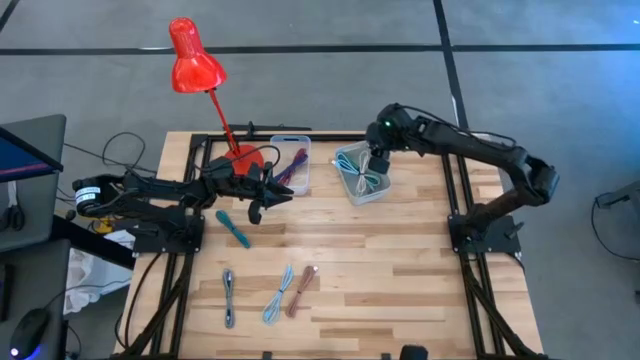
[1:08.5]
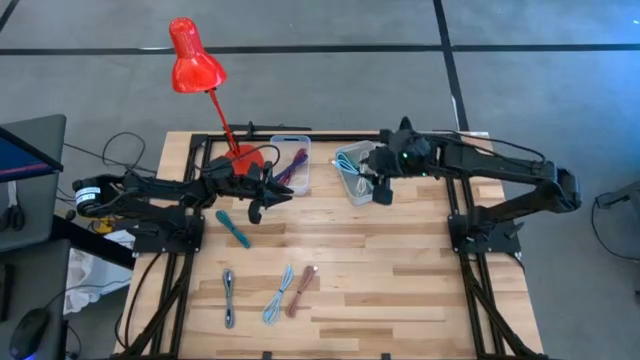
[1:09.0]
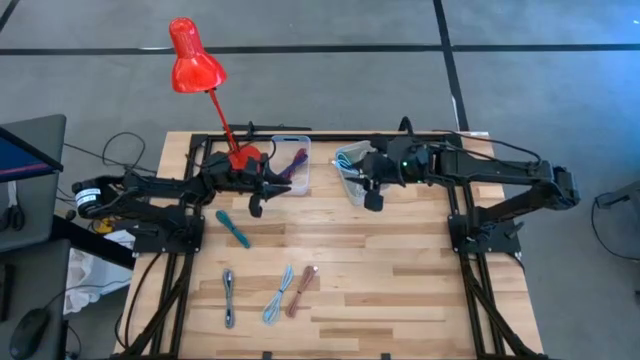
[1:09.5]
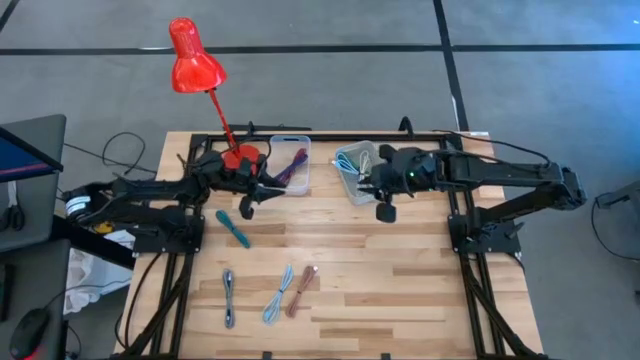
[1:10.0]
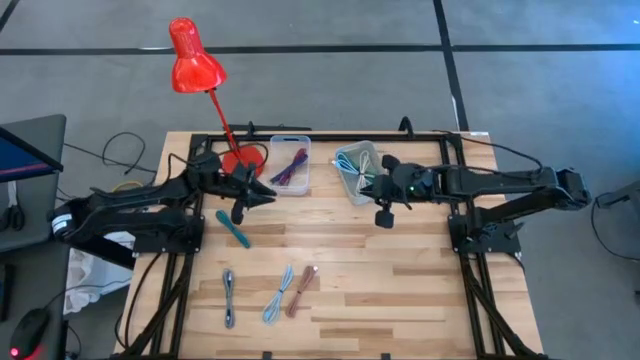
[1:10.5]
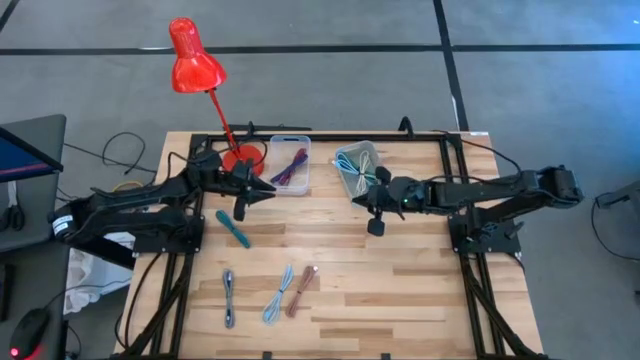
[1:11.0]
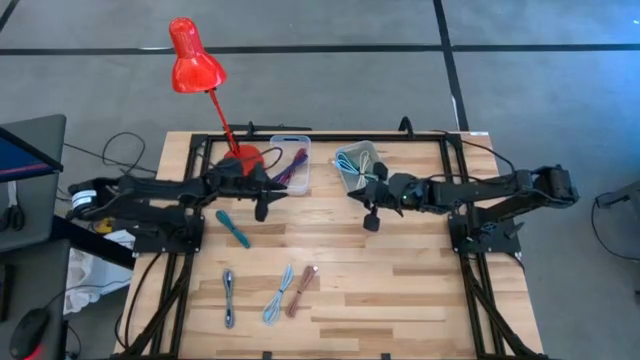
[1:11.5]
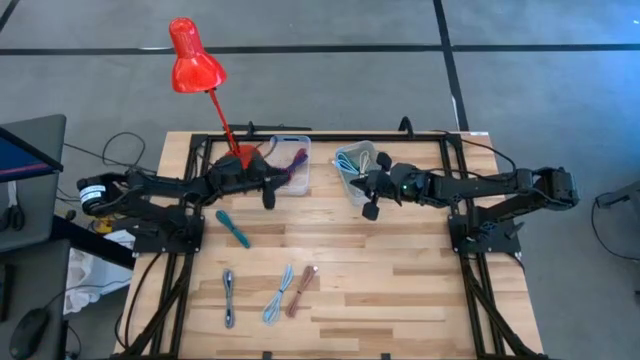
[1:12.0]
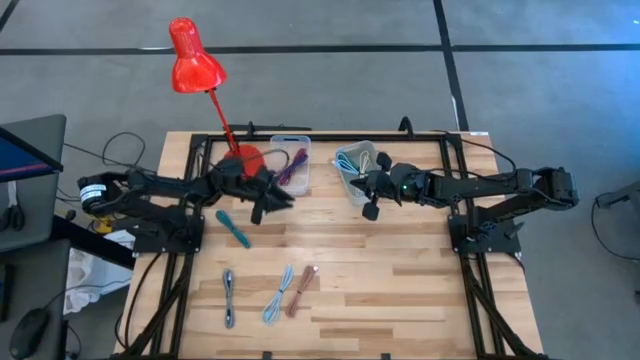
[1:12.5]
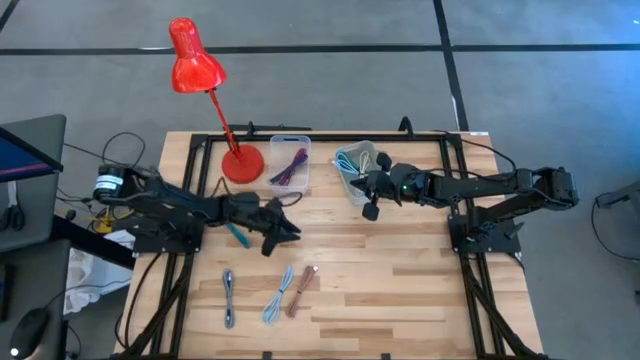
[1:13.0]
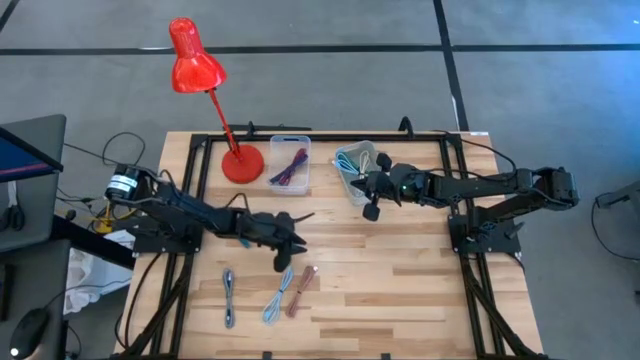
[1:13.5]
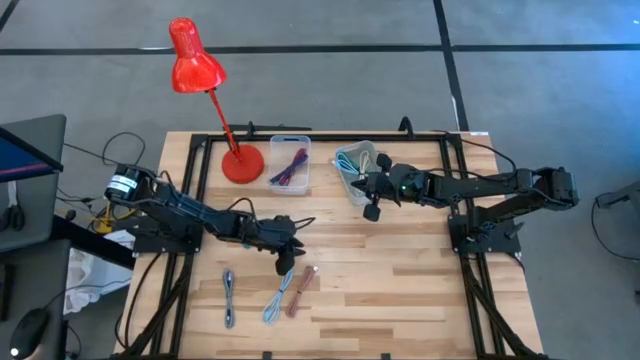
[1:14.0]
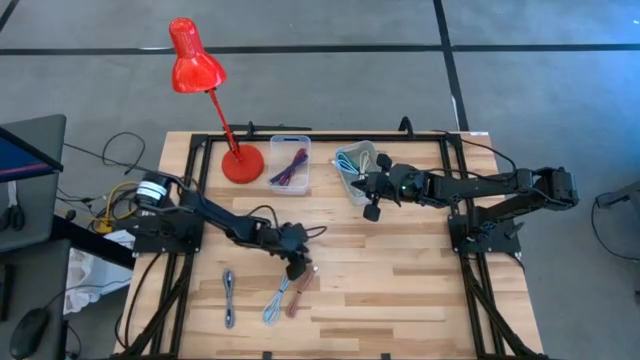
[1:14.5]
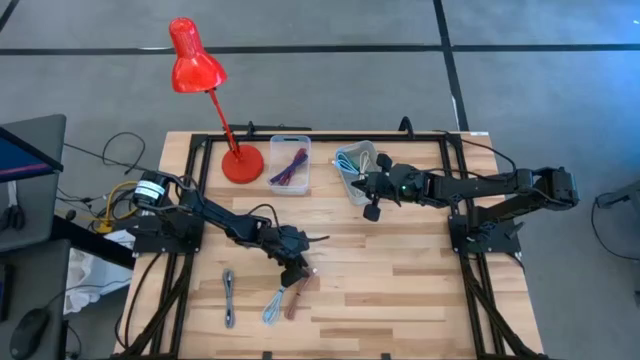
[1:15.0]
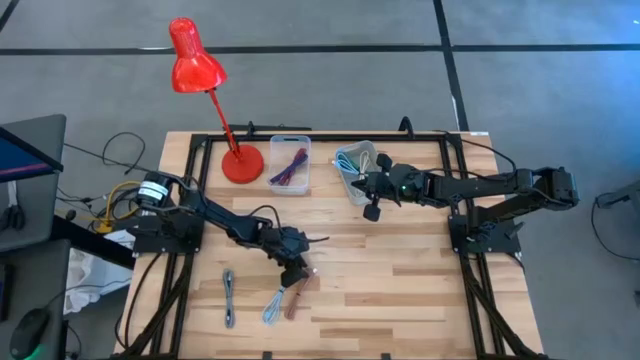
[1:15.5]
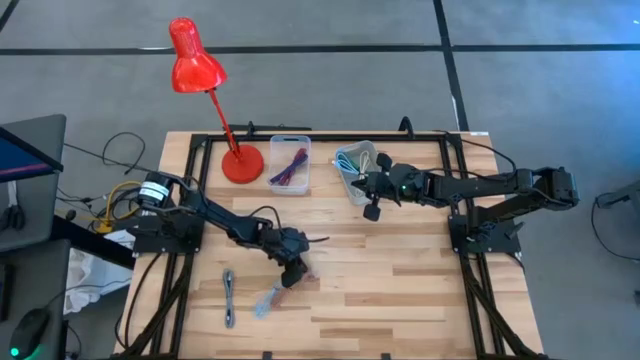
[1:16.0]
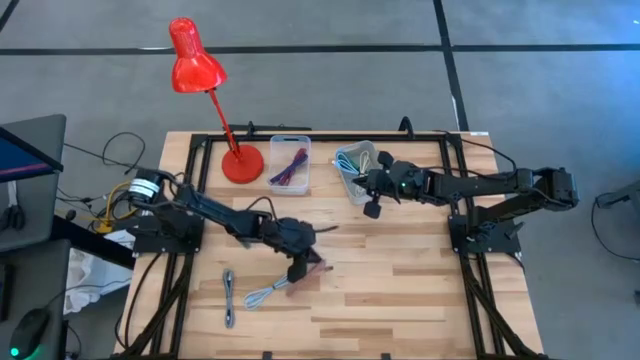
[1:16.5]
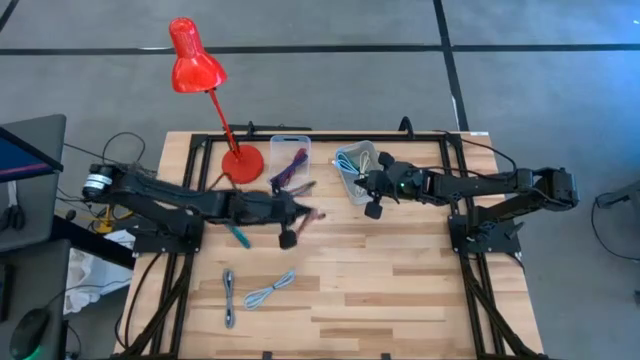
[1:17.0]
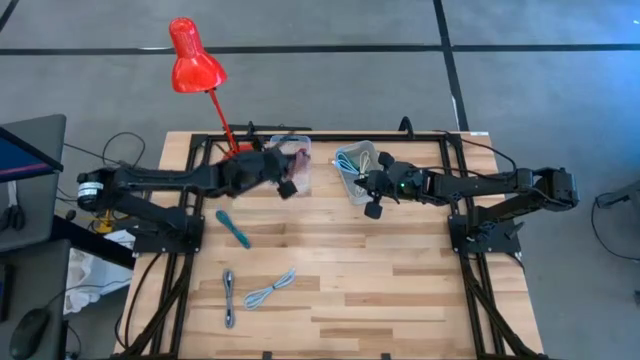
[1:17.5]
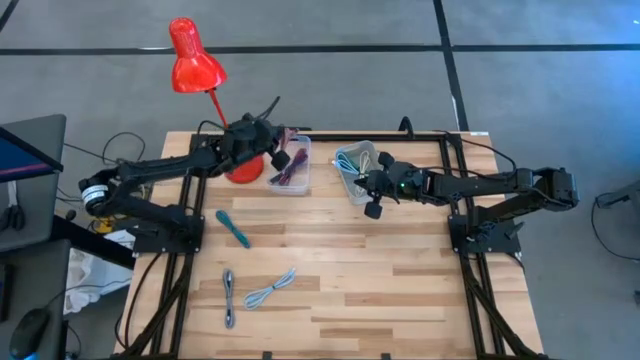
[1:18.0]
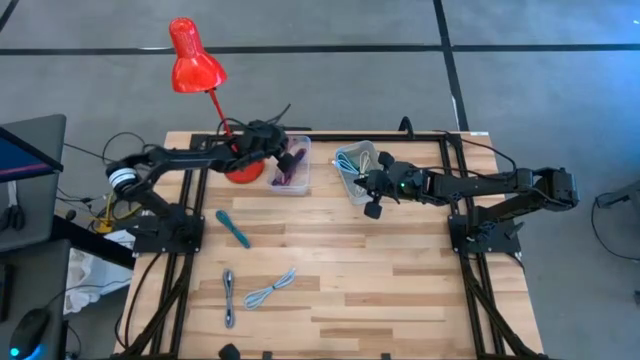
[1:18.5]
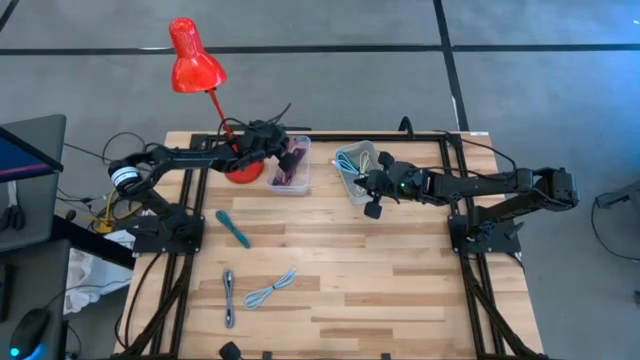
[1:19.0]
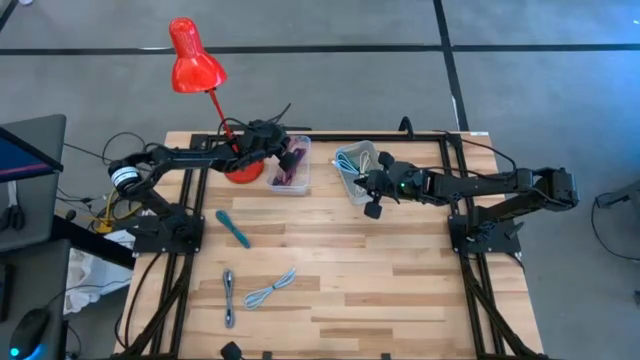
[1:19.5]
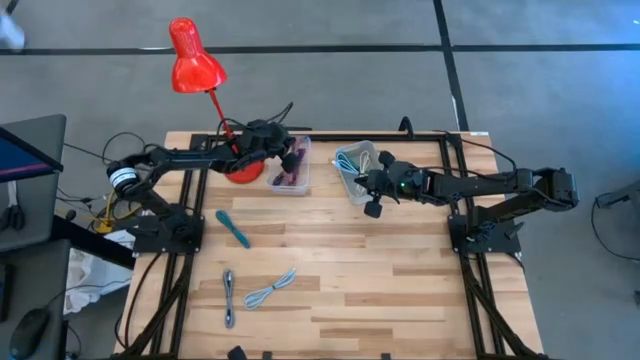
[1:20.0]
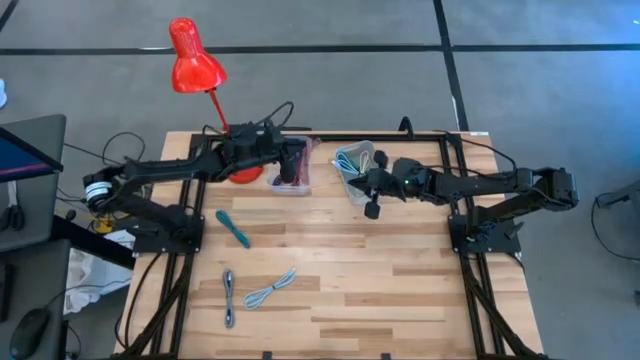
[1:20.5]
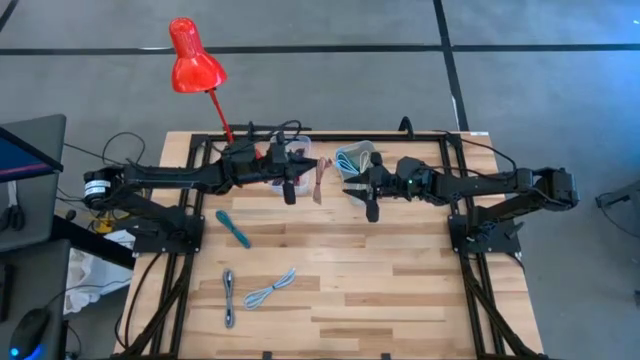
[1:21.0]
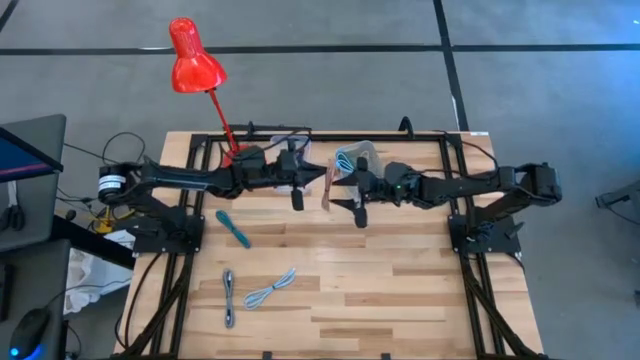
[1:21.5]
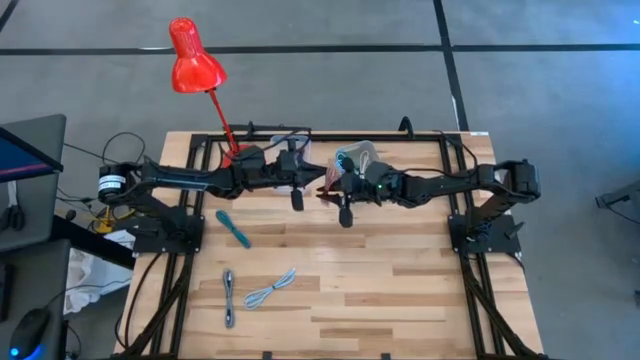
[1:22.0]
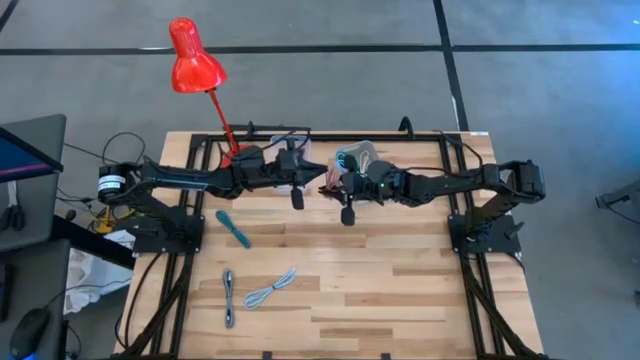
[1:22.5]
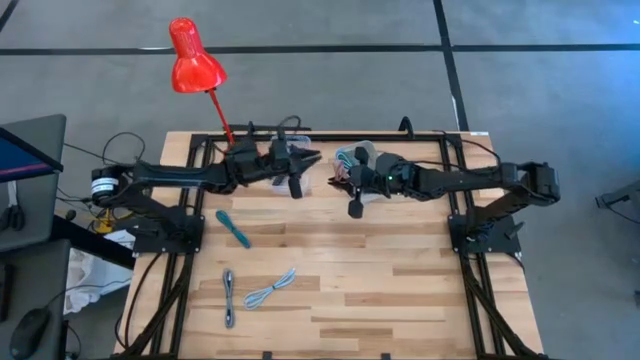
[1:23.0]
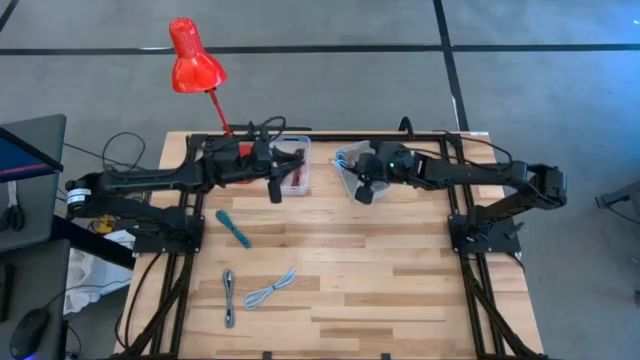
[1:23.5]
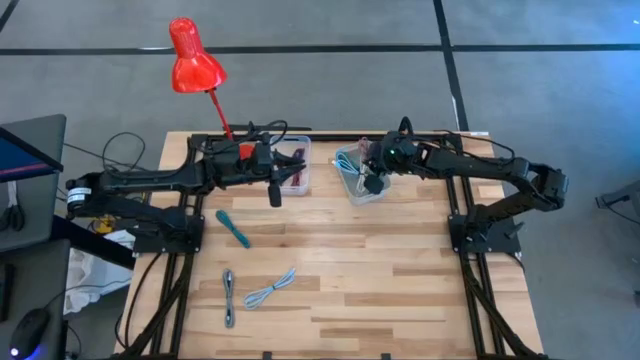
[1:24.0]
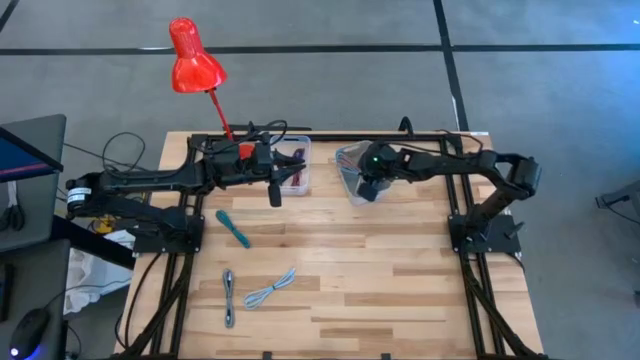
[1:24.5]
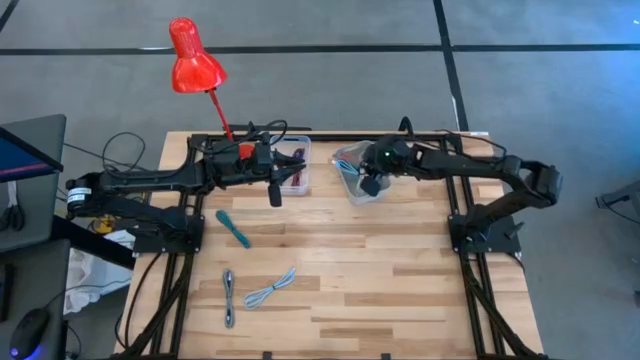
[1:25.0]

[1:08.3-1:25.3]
Task: Pick & Place USB Port
Put the pink USB cable into the gray bin

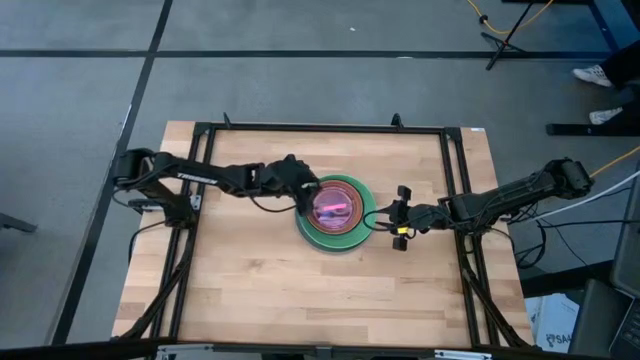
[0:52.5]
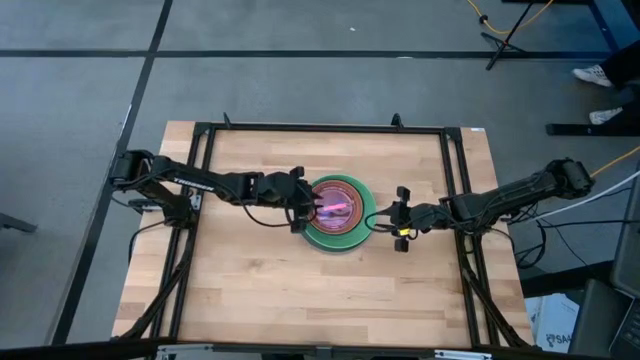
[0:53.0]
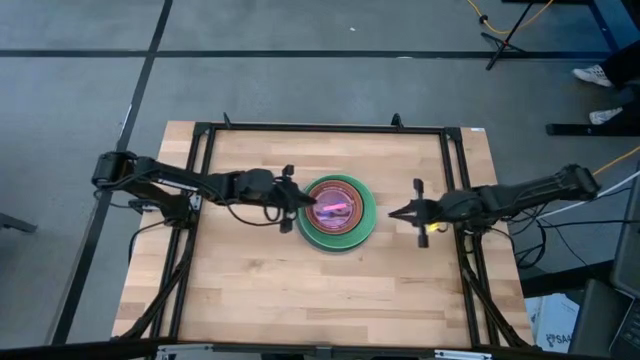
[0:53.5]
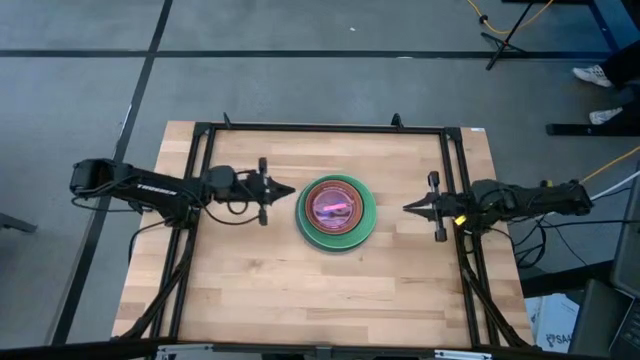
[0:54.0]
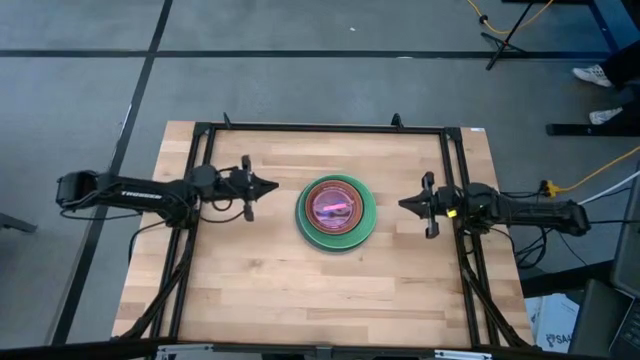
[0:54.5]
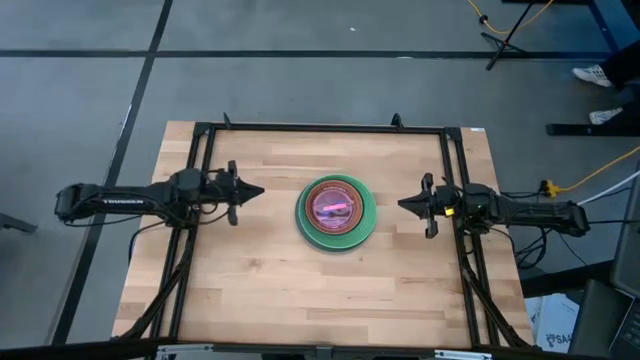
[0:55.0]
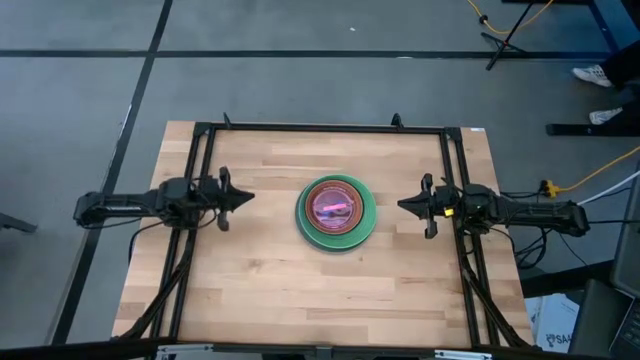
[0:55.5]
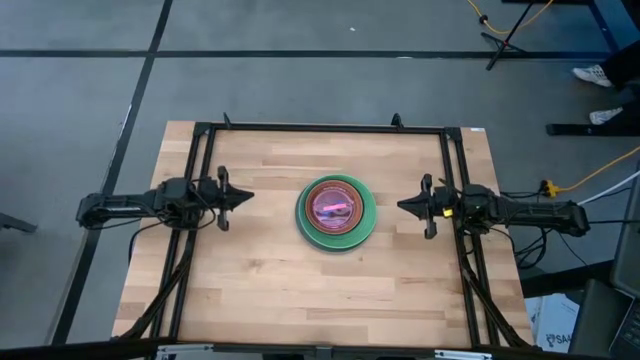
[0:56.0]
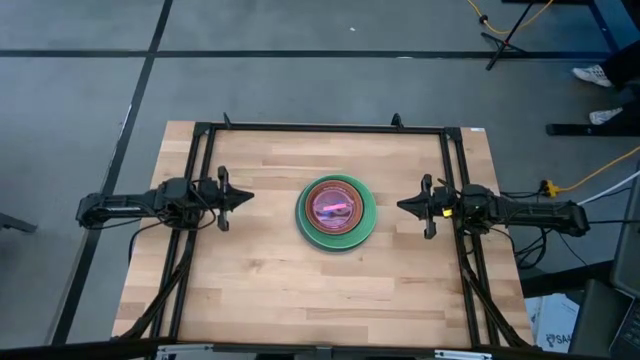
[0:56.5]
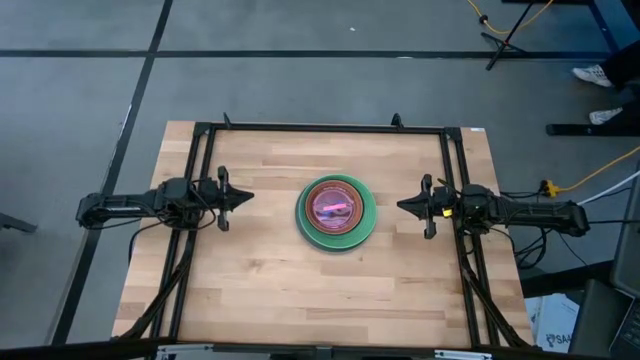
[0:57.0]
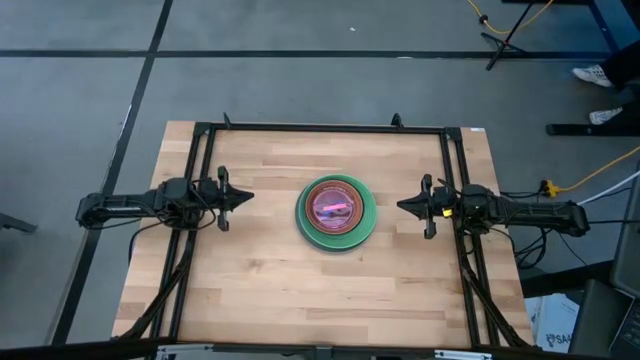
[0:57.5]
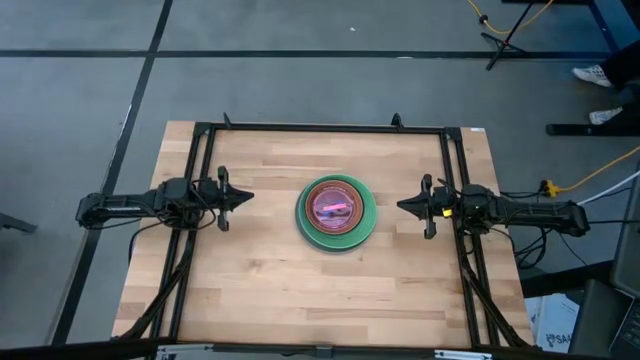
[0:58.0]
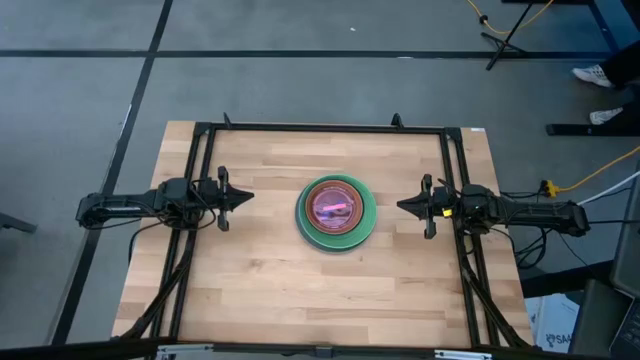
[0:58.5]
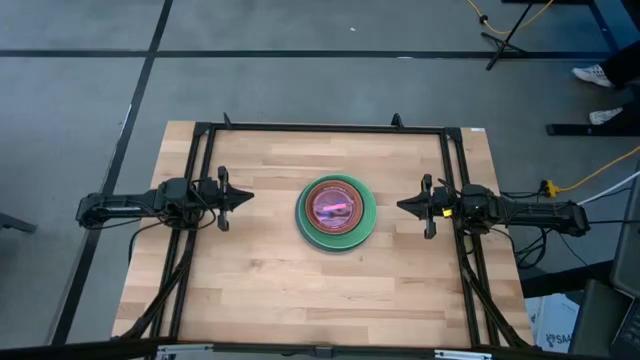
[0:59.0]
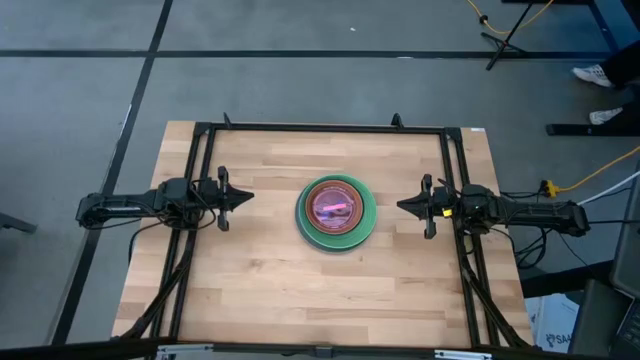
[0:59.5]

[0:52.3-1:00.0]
Task: Stack plastic plates
Return to Home Position
